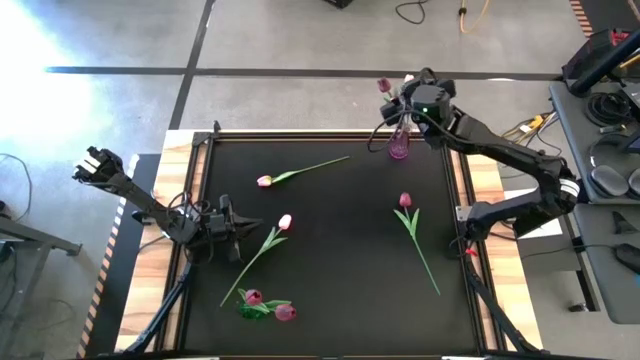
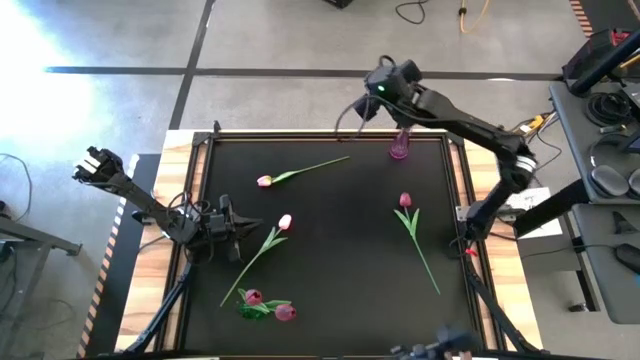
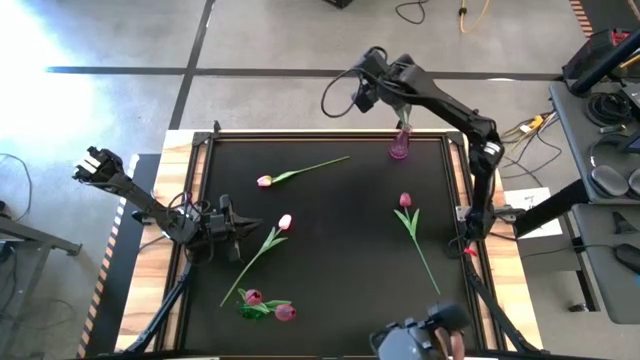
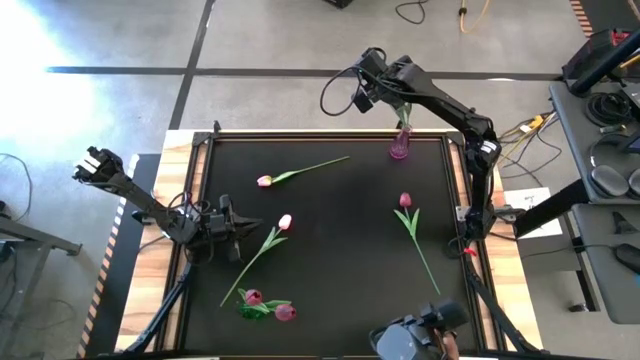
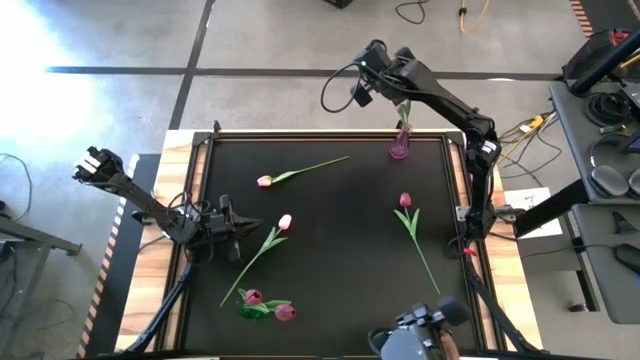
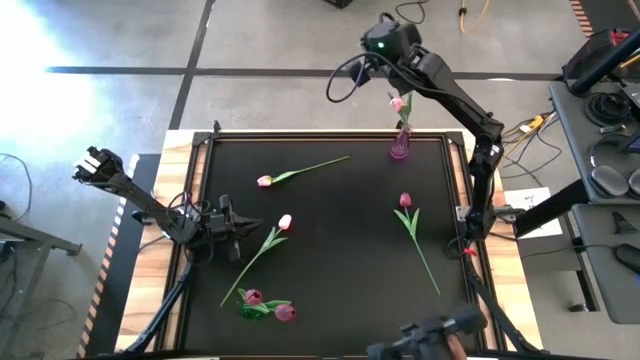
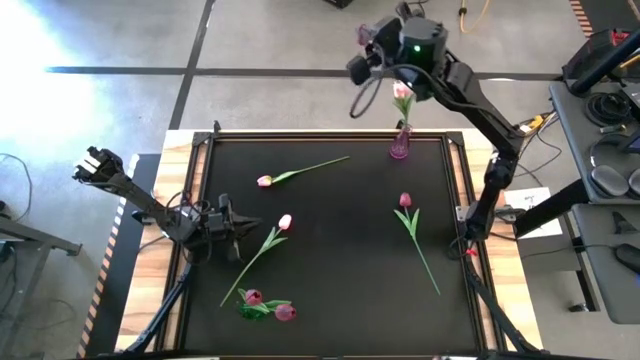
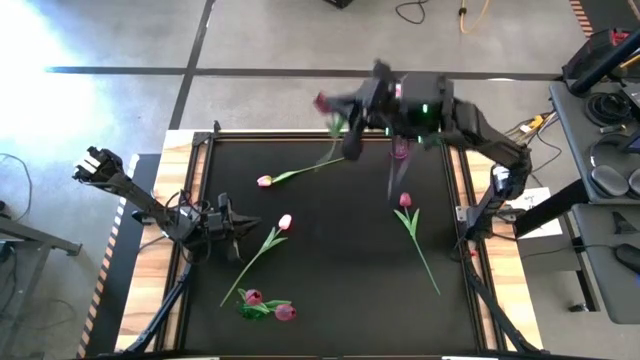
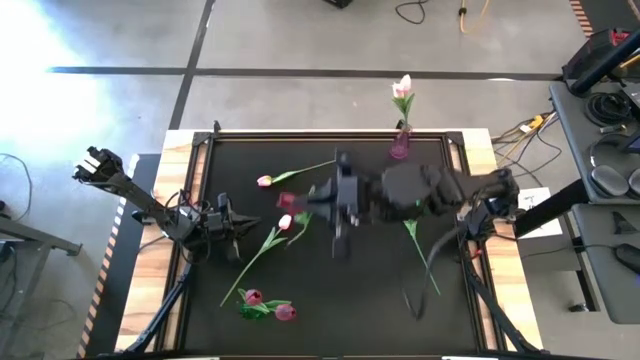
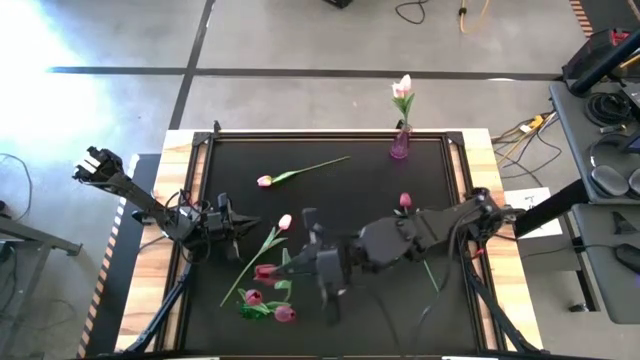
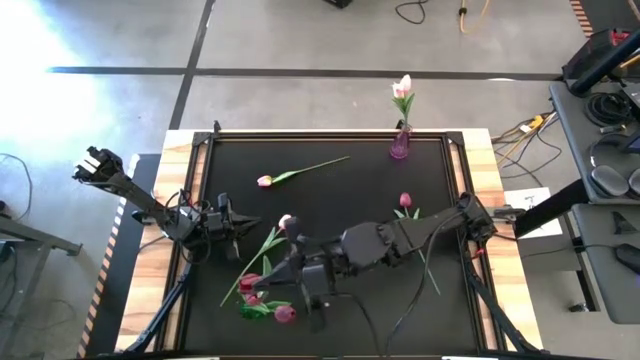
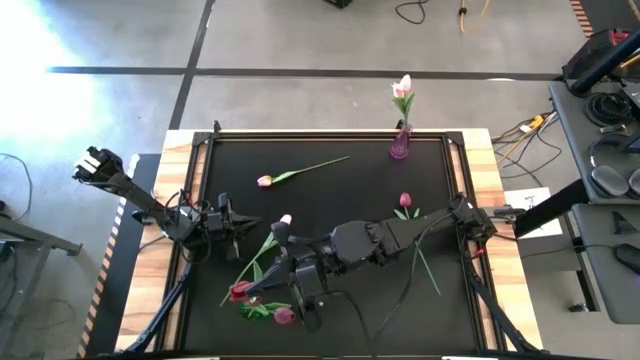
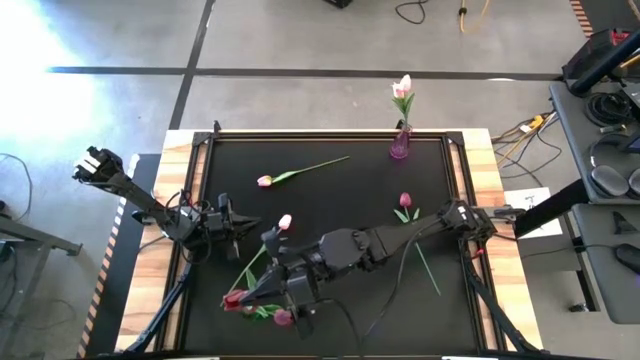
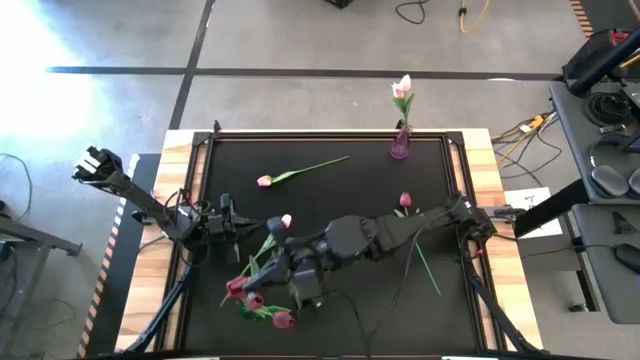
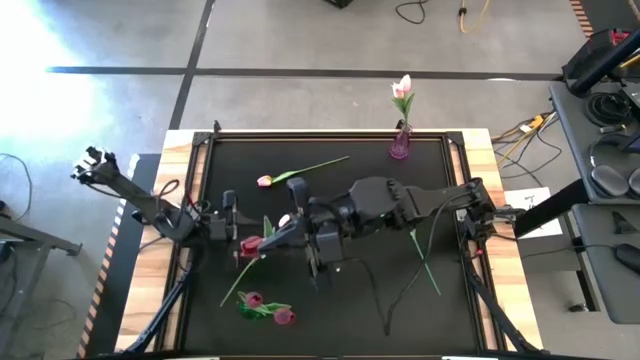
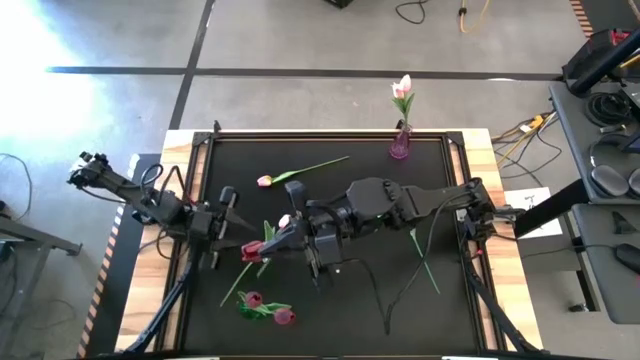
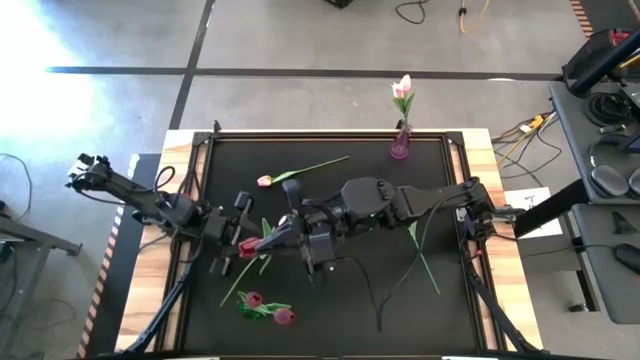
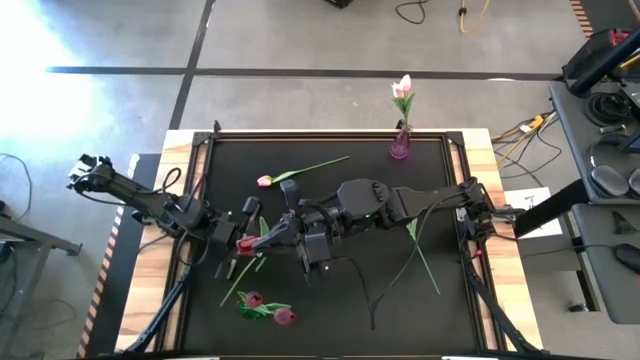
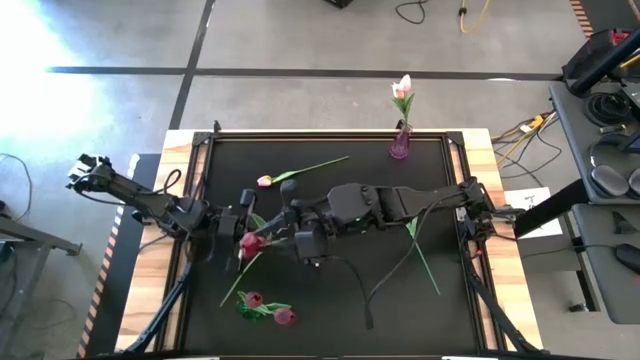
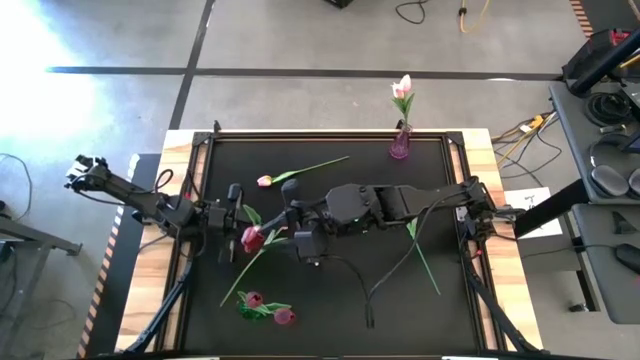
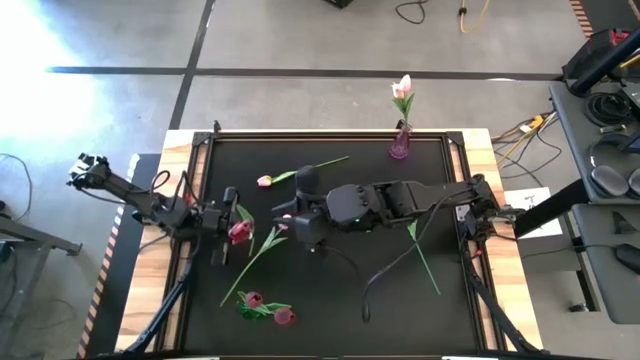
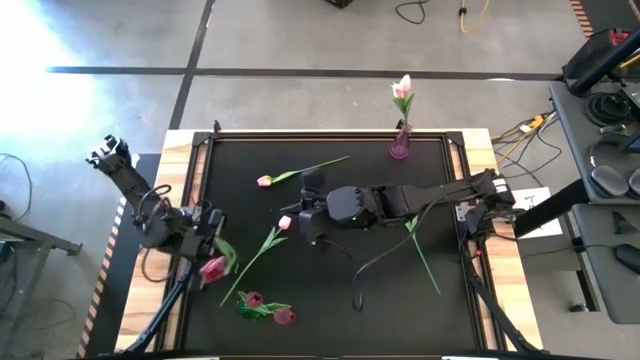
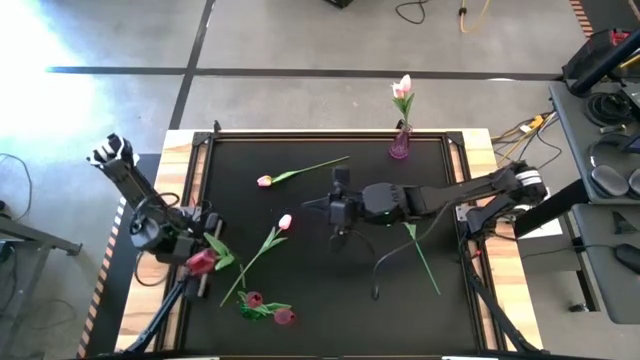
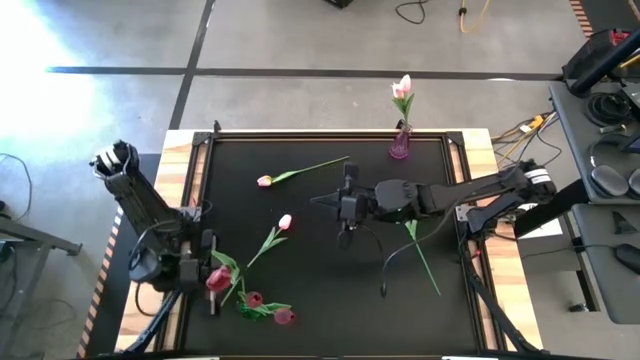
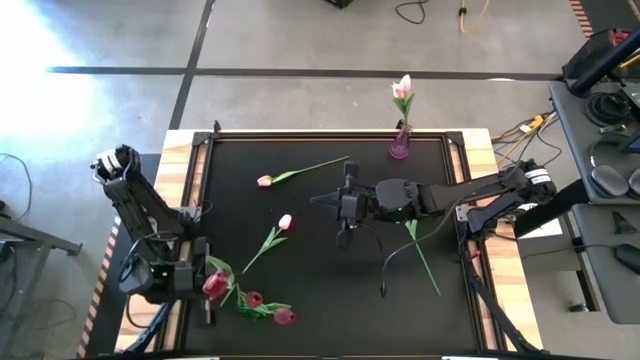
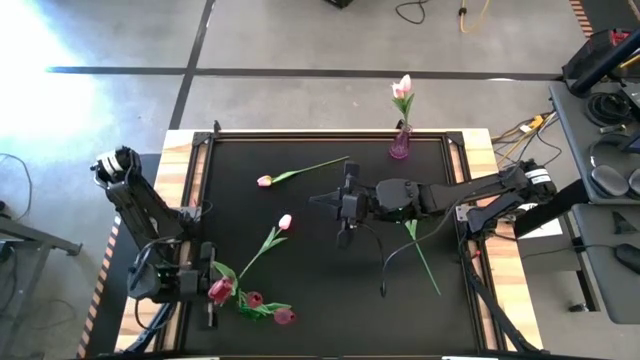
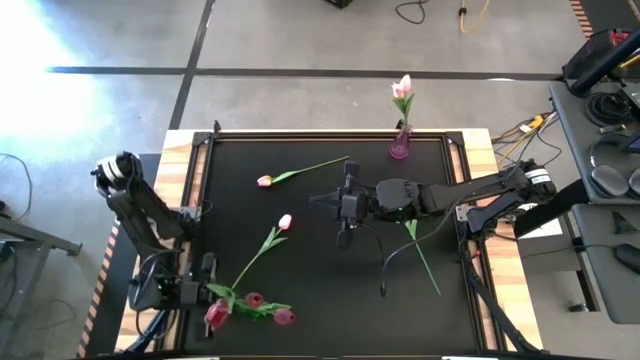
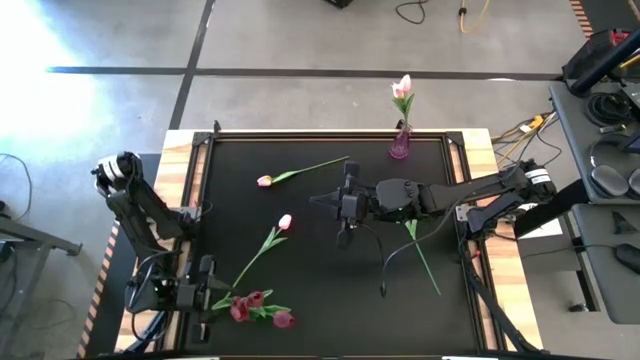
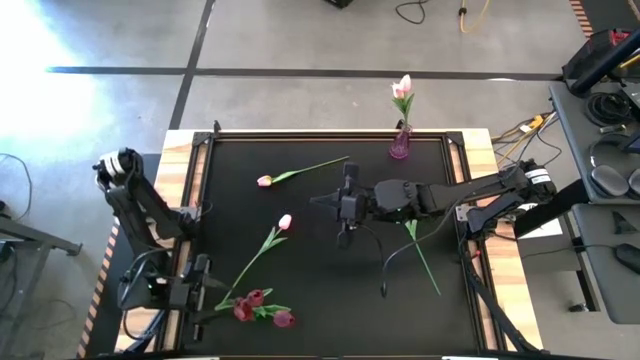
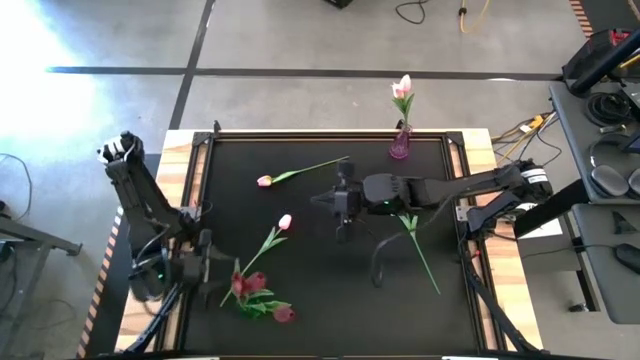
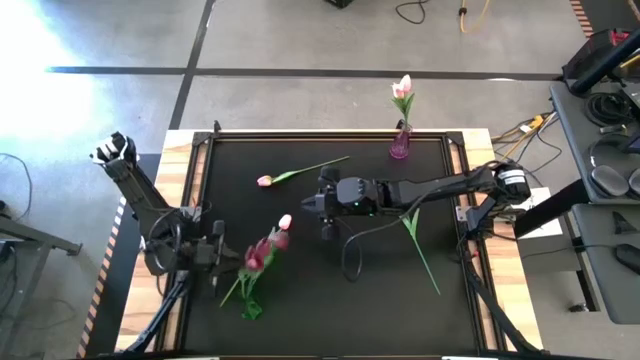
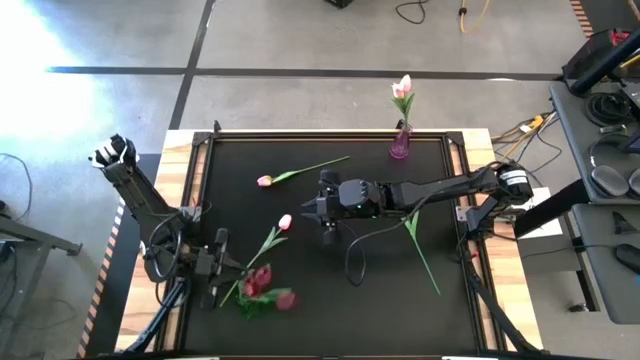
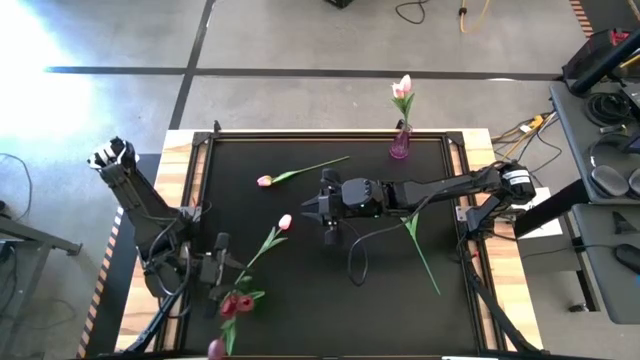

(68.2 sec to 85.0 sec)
Task: Sort flowers into vase by color
Put the violet flower into the green vase

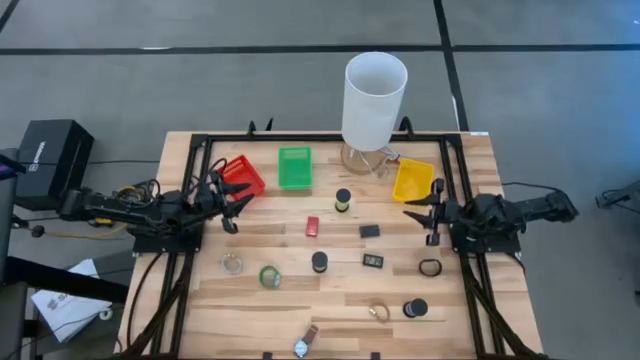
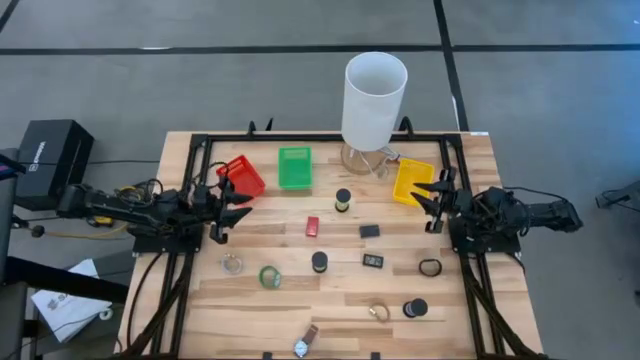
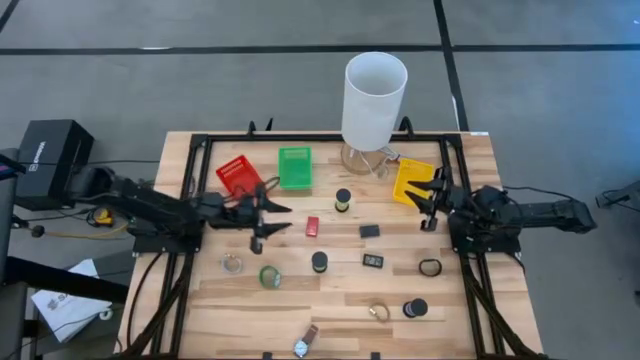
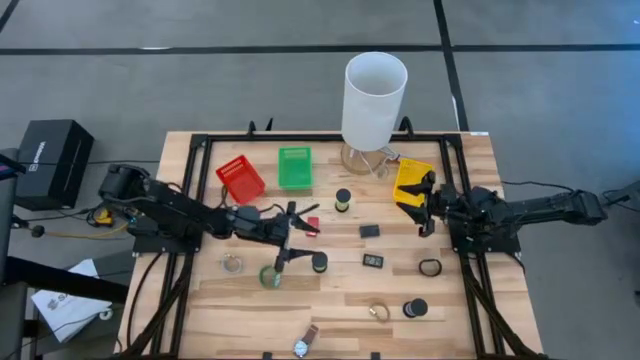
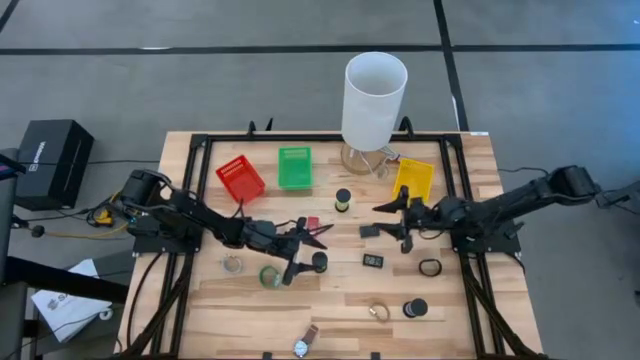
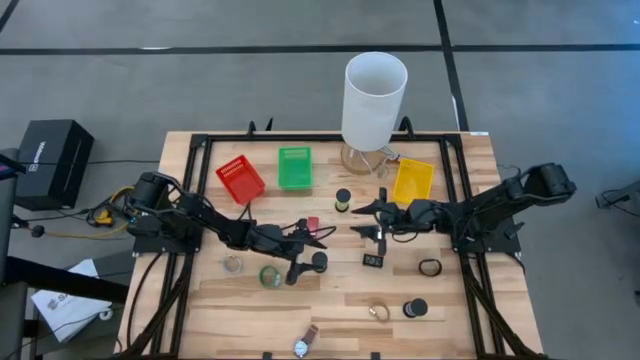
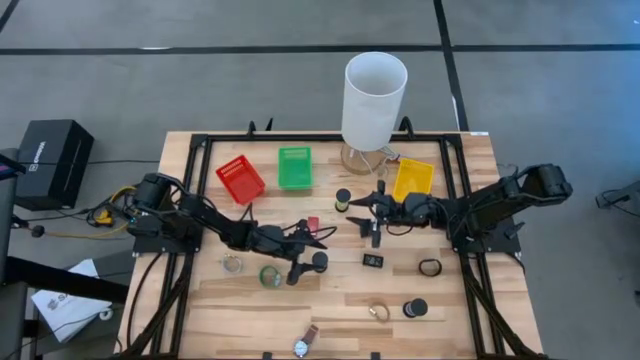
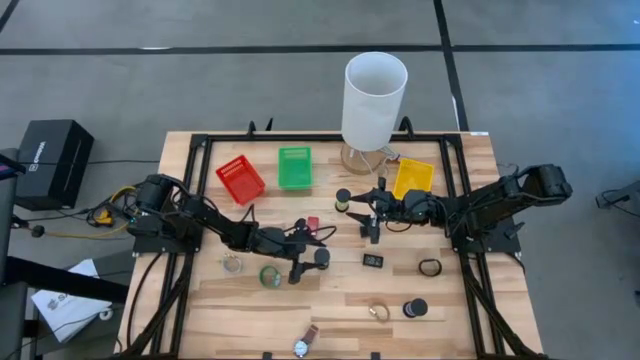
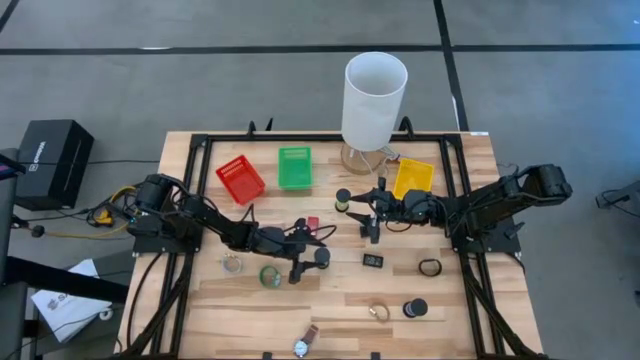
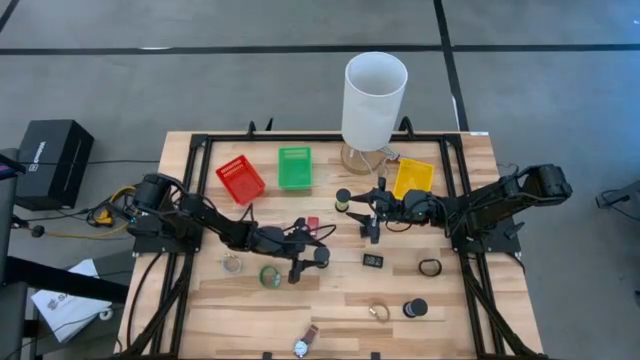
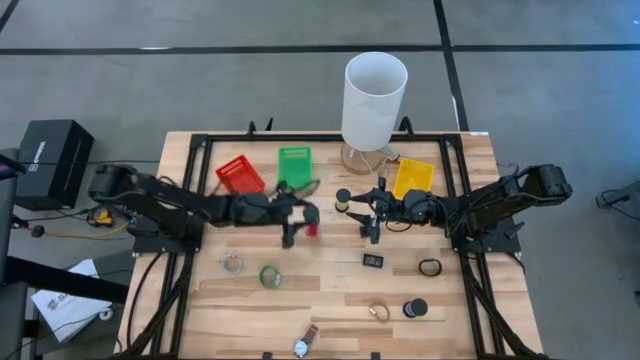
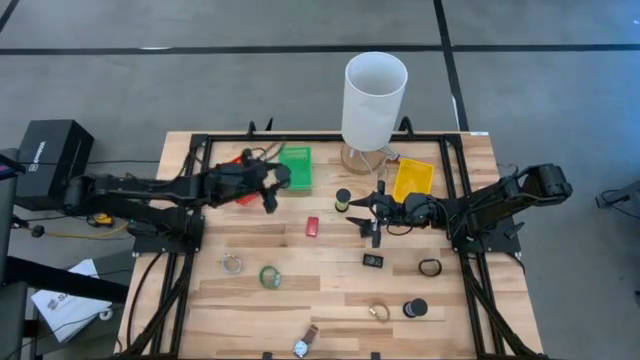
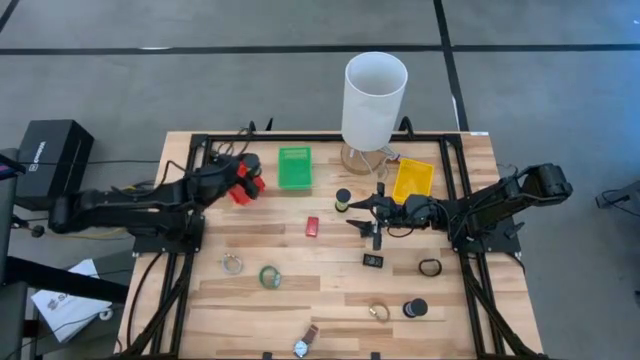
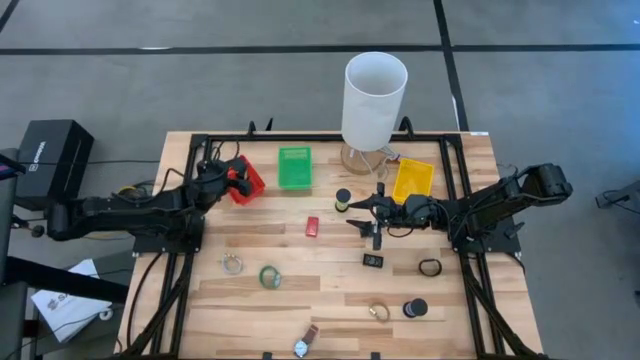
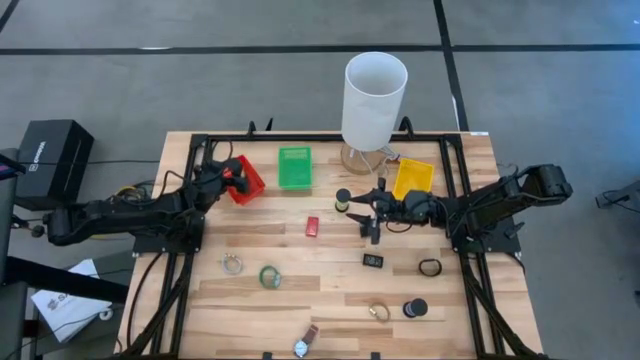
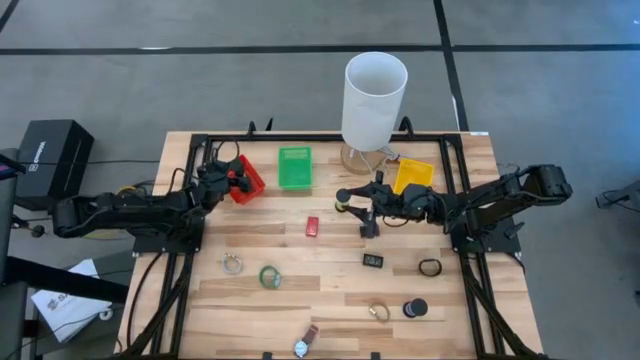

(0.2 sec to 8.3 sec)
Task: Pick & Place Office items
Put the bottom green hourglass into the orange bin
